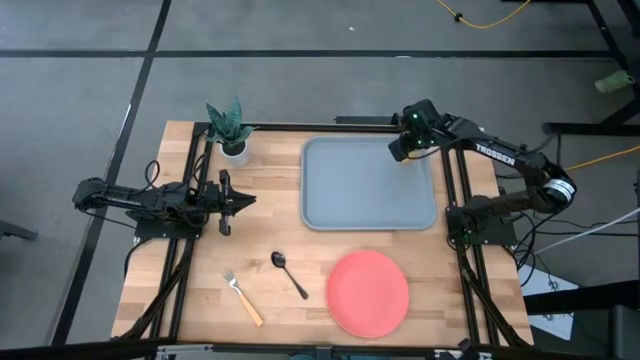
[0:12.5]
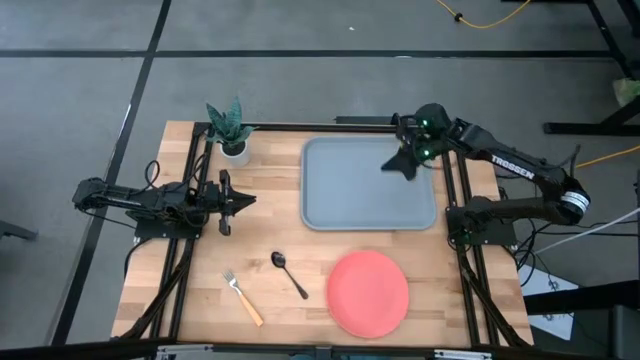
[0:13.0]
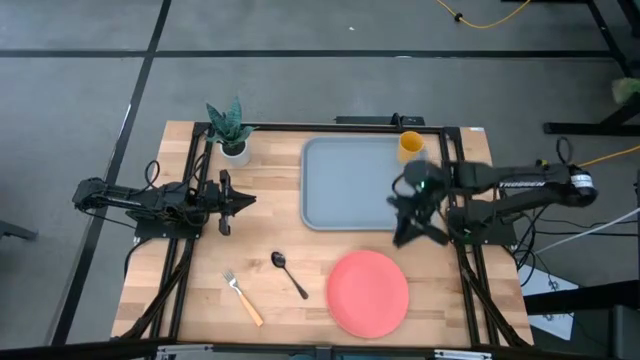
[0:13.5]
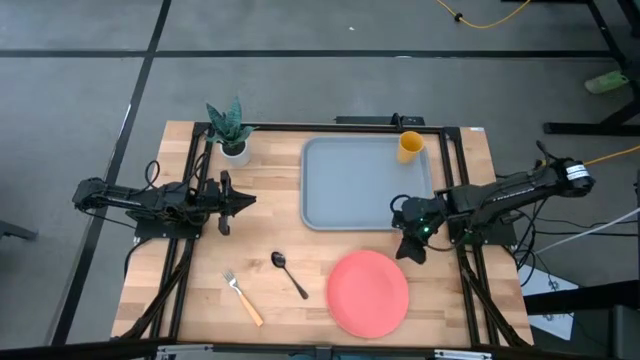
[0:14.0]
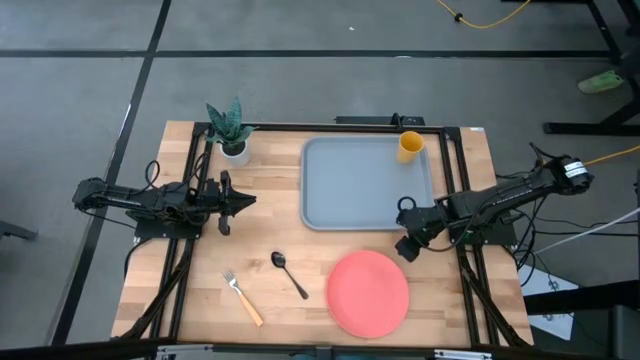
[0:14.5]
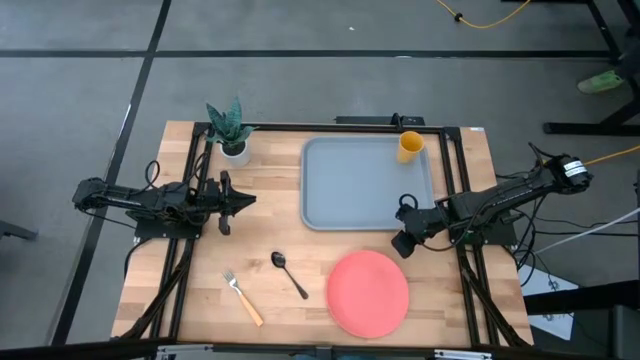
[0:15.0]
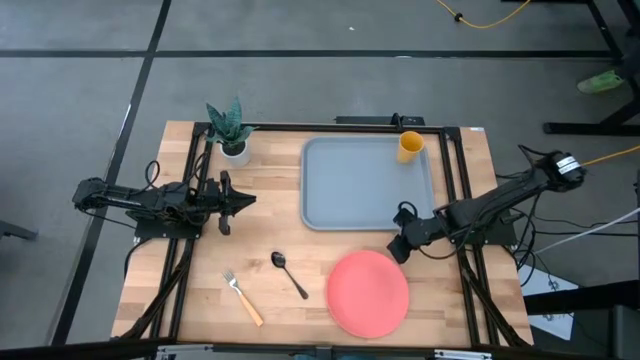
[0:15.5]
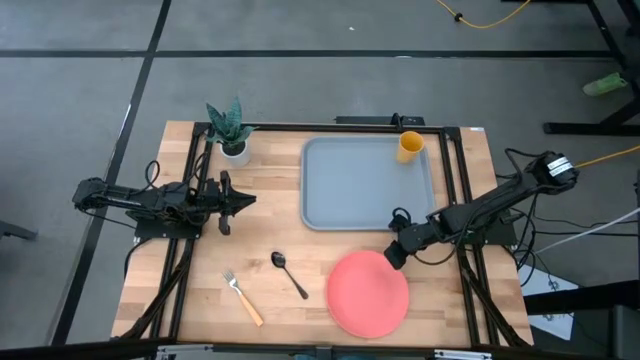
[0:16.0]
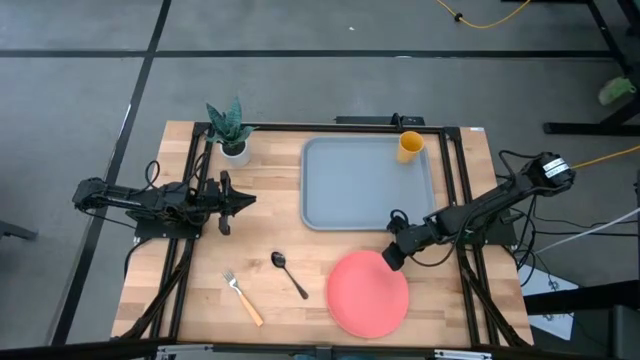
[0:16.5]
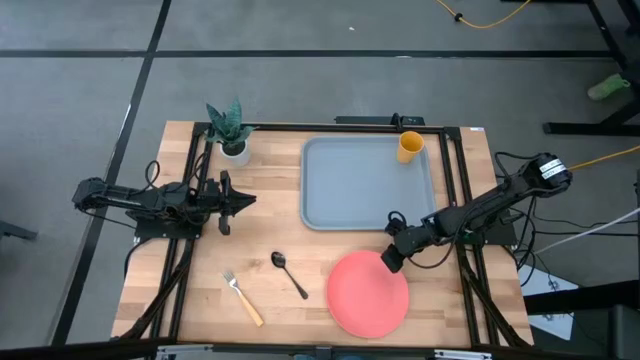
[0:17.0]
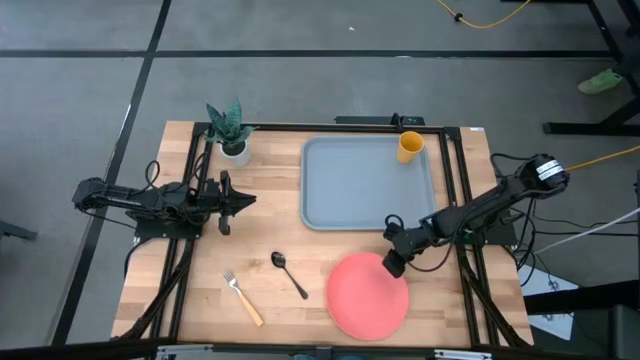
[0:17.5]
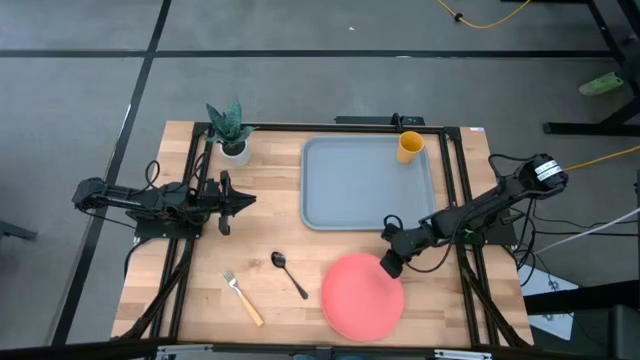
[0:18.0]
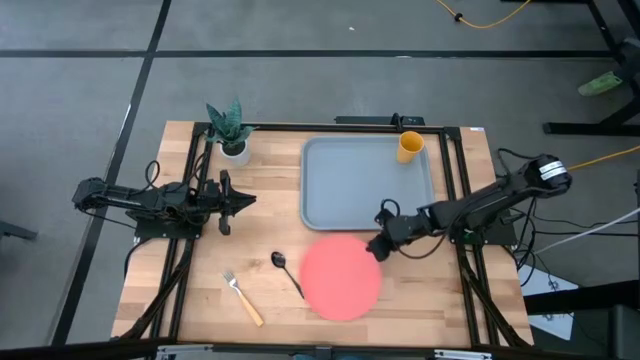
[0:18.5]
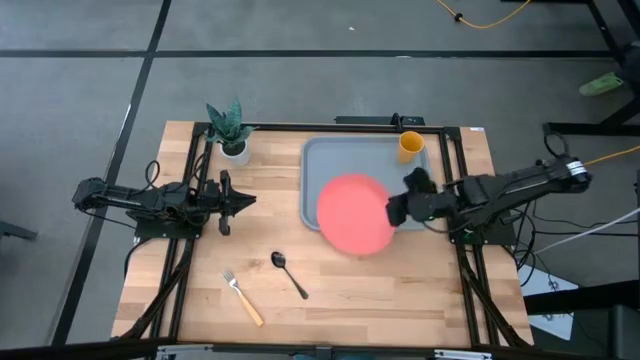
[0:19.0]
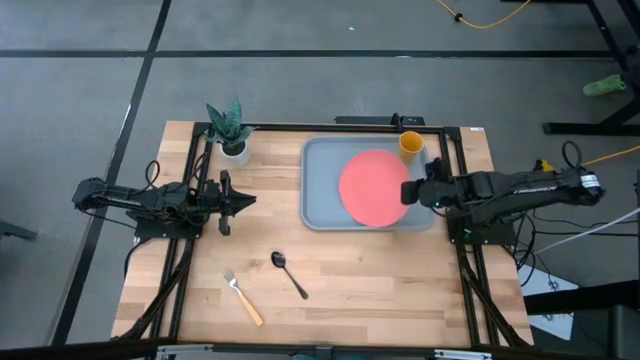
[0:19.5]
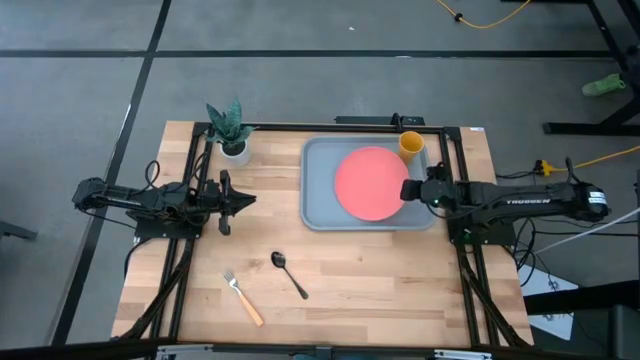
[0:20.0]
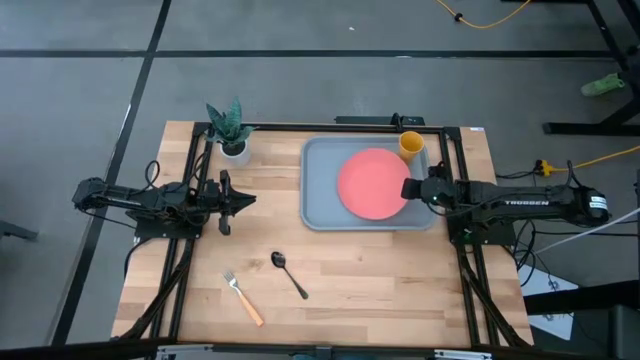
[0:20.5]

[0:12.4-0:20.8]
Task: Pick and place plate/cup/fork/spoon on tray
Put the pink plate on the gray serving tray

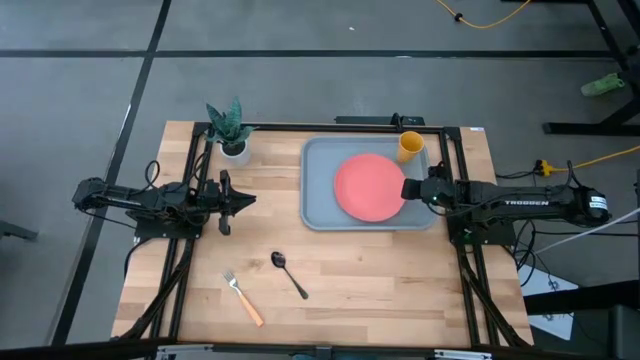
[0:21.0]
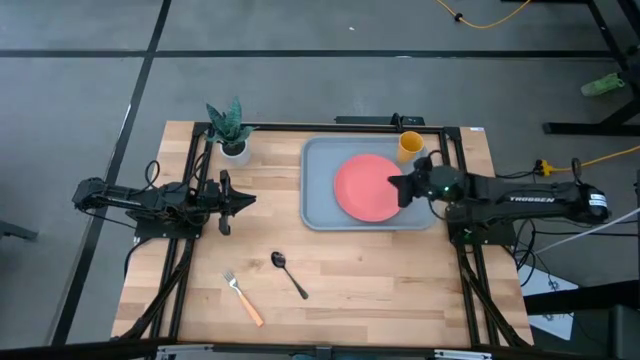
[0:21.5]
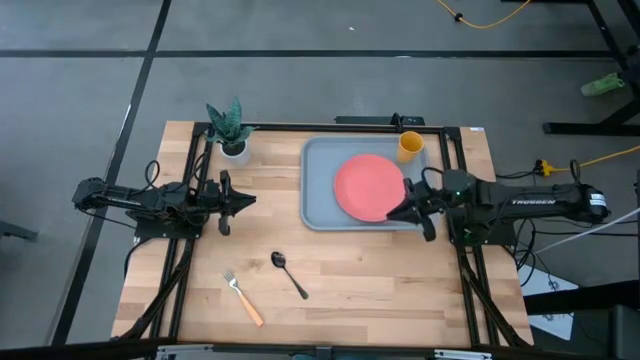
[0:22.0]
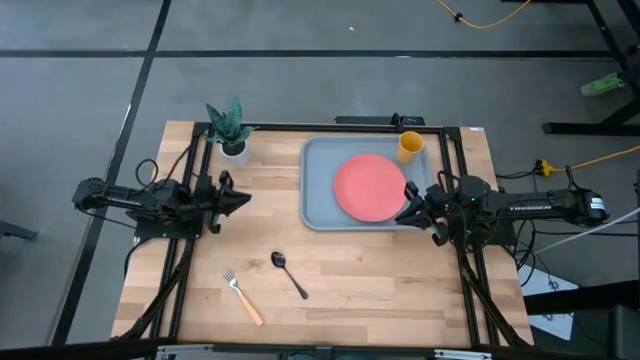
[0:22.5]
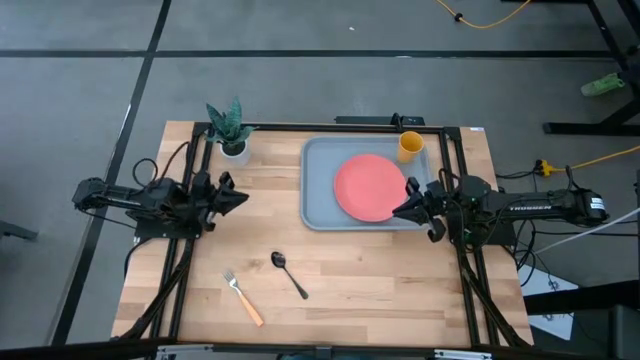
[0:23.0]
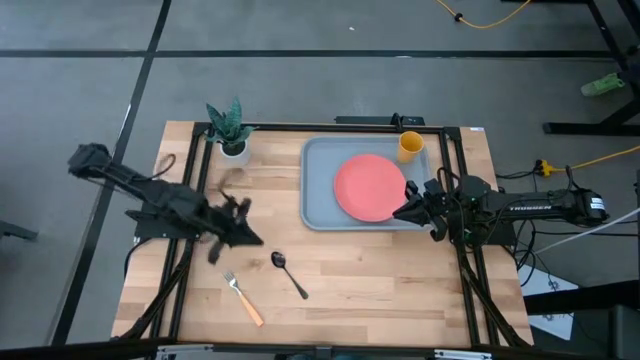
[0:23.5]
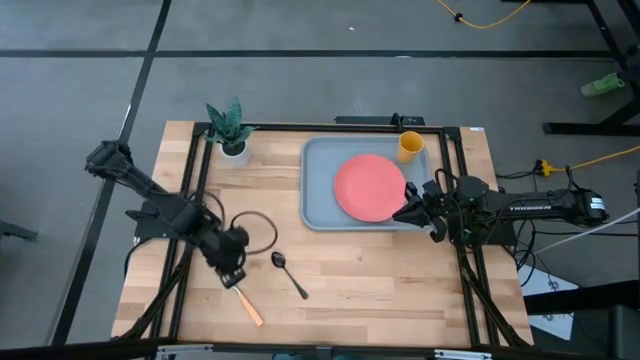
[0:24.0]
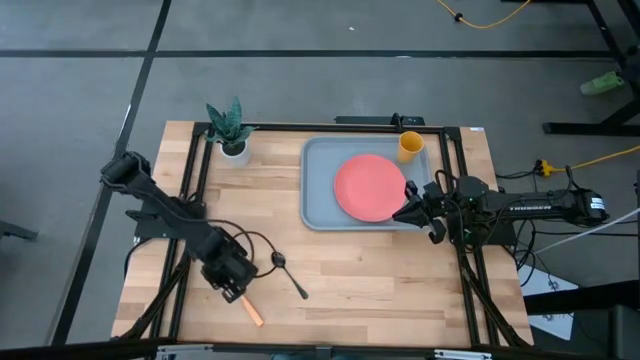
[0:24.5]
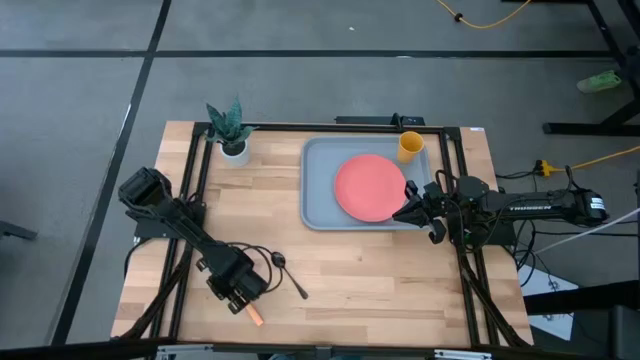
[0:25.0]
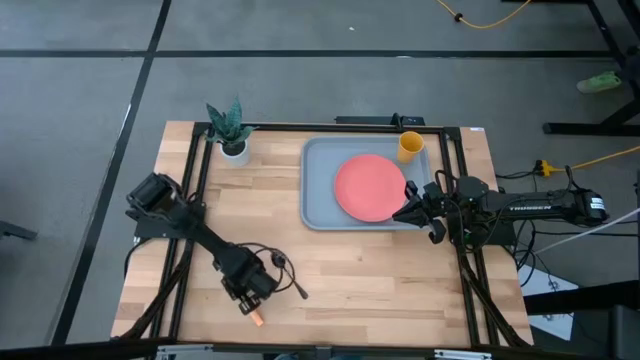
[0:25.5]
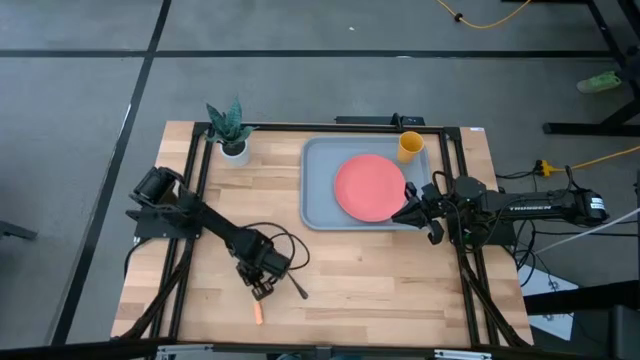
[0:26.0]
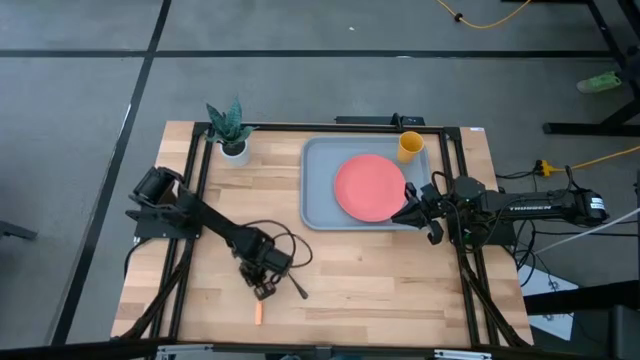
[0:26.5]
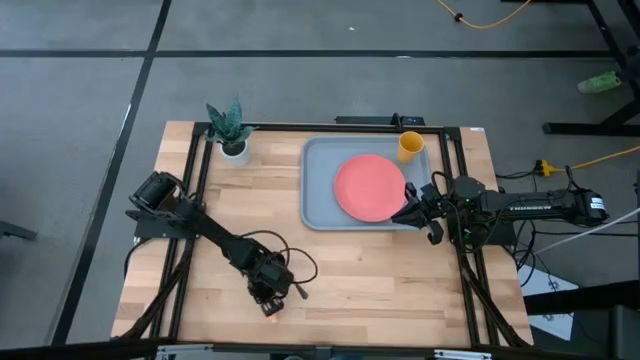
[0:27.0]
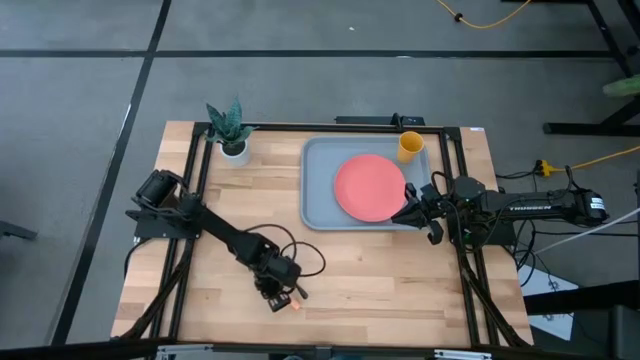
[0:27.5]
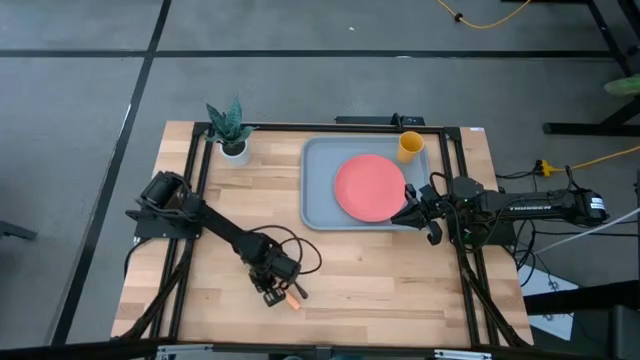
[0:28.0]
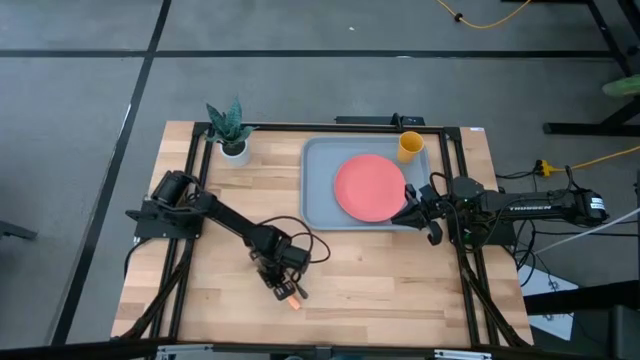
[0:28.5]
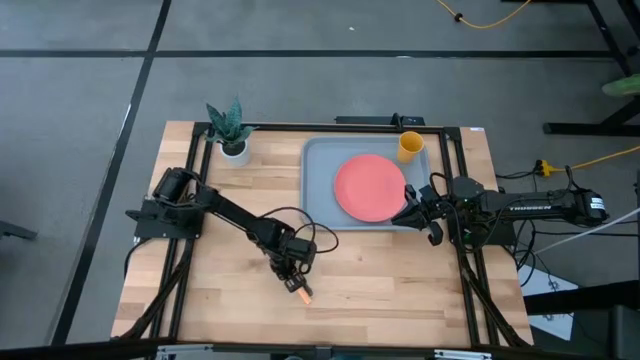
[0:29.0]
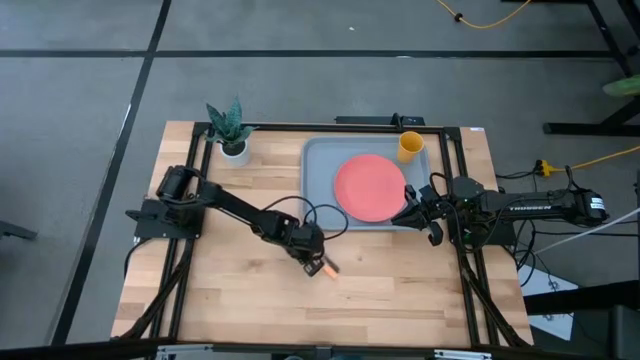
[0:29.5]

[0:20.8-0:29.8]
Move the silverware to the center of the table

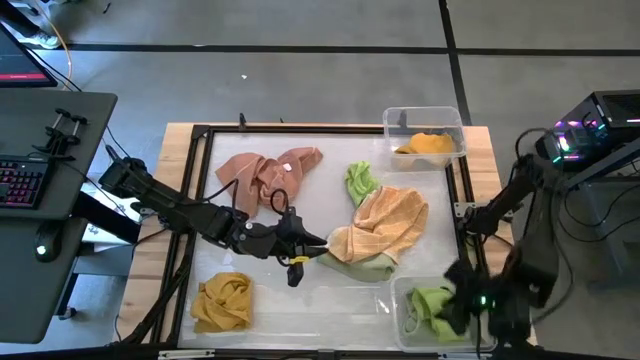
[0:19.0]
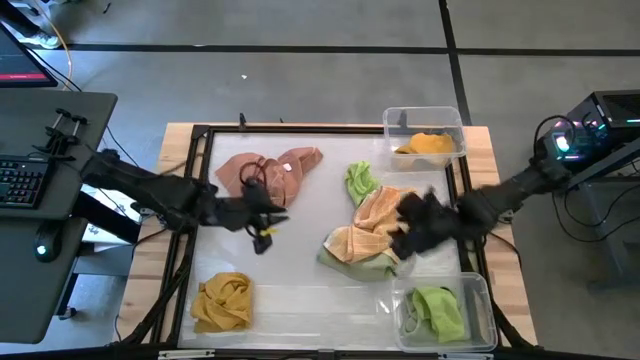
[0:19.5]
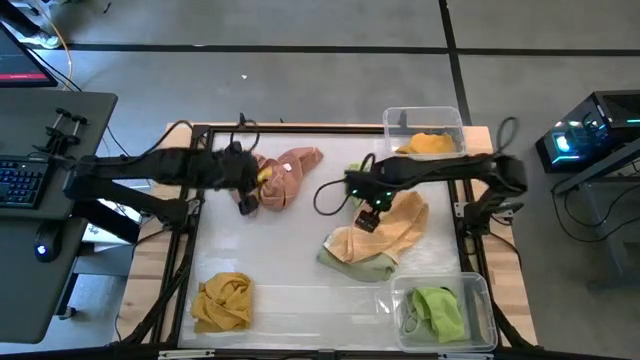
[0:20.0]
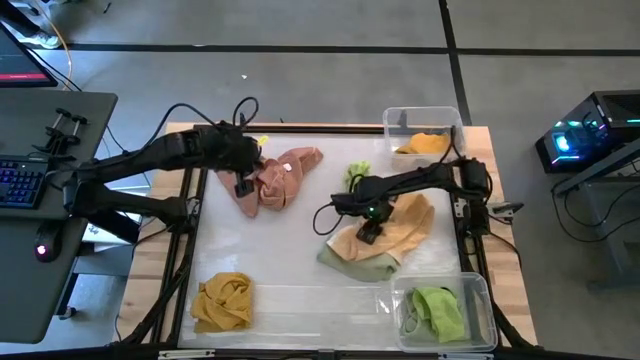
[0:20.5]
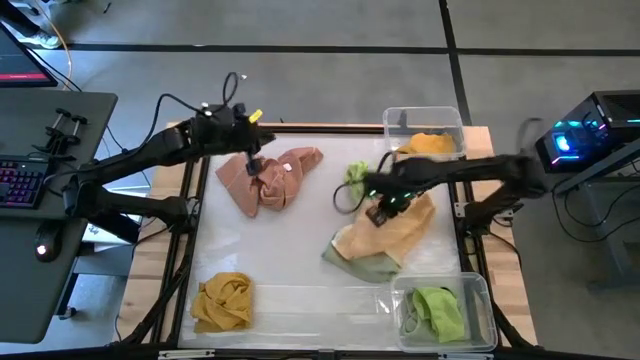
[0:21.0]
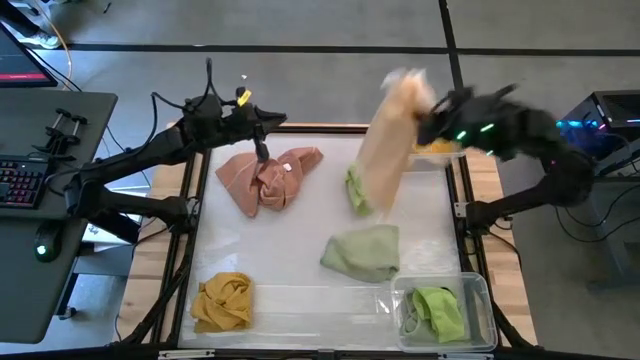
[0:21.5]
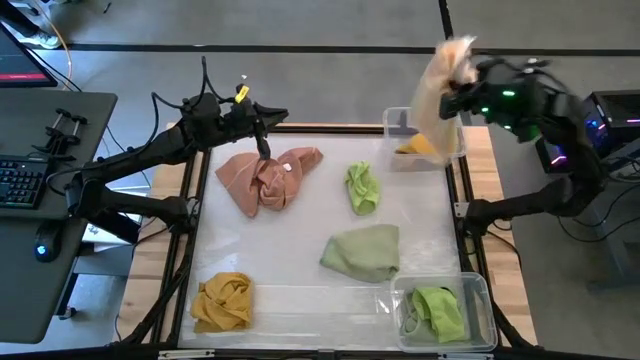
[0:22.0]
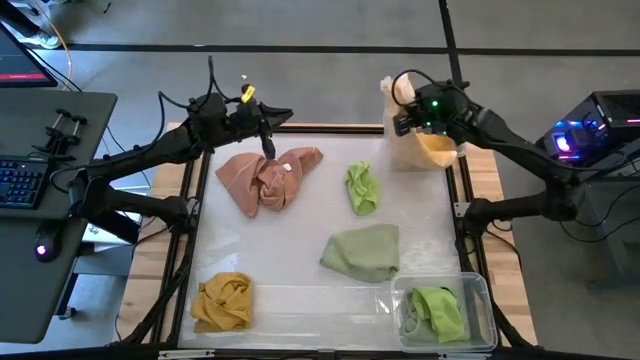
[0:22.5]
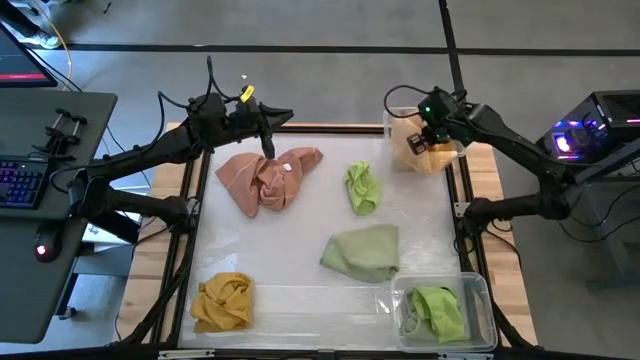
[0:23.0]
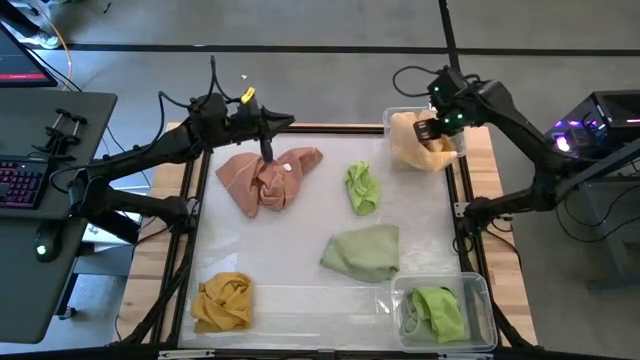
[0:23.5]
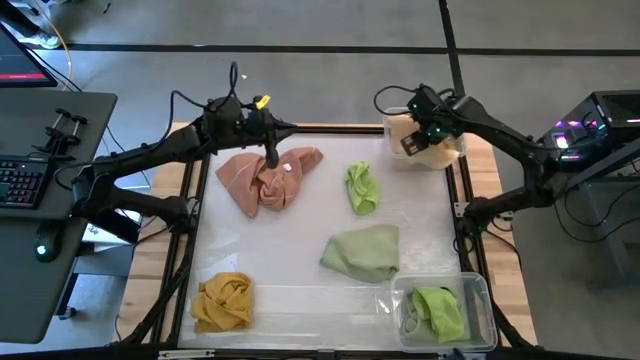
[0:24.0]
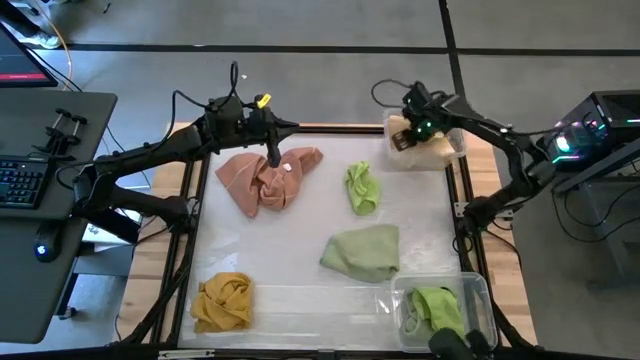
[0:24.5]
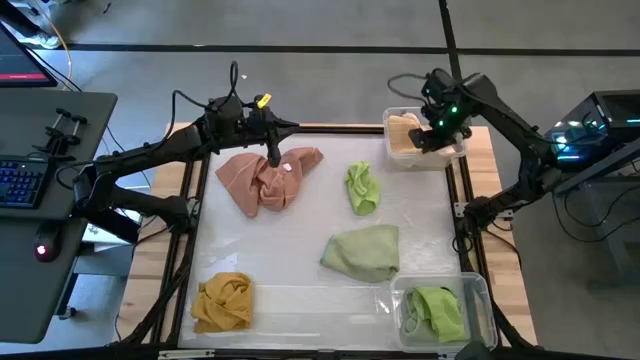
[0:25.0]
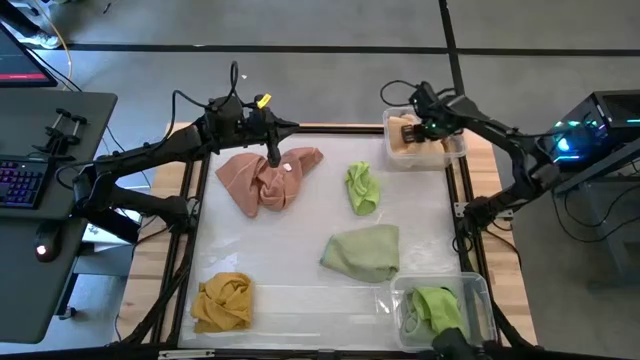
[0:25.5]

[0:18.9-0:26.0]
Task: Sort towels by color in basket
Put the yellow patterned towel into the top transparent bin
